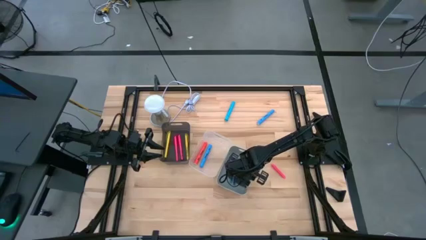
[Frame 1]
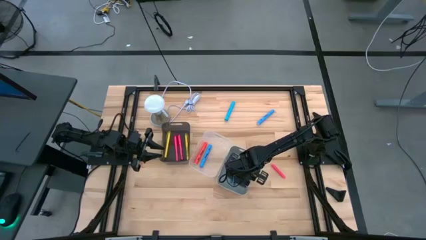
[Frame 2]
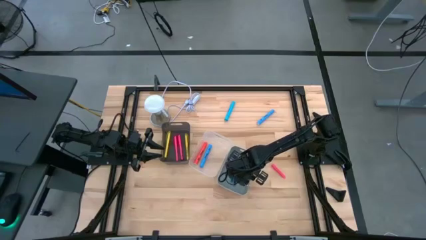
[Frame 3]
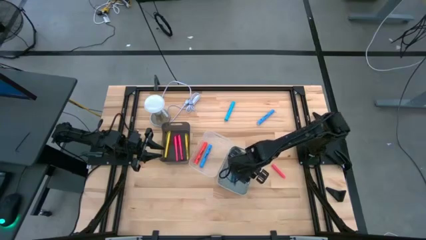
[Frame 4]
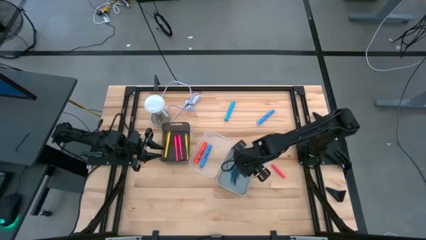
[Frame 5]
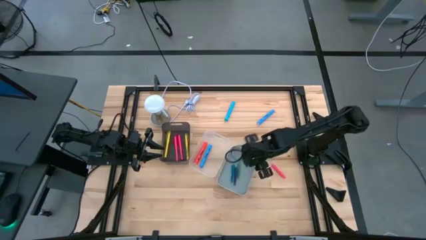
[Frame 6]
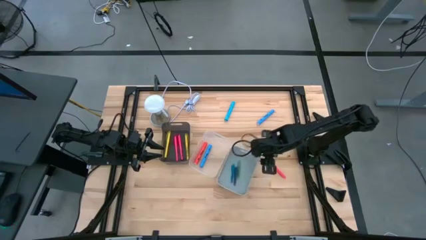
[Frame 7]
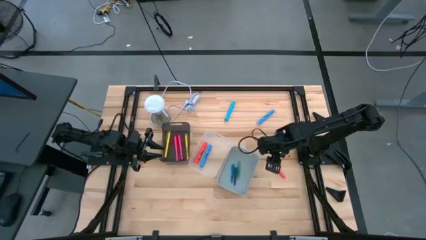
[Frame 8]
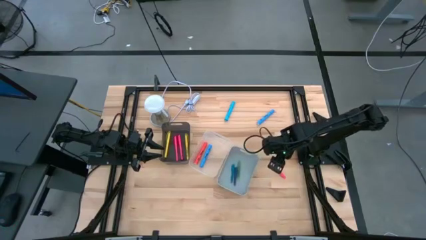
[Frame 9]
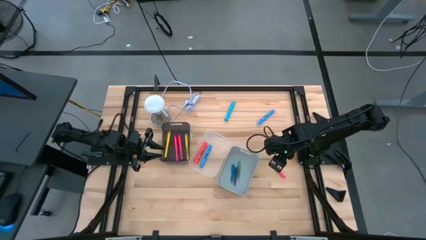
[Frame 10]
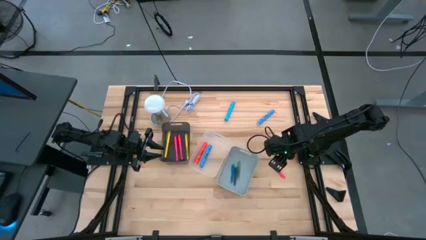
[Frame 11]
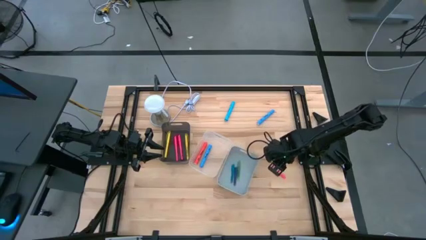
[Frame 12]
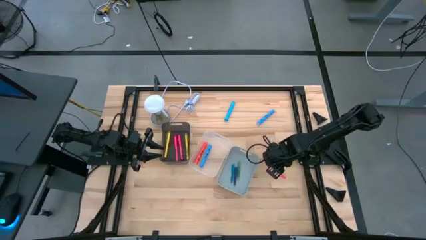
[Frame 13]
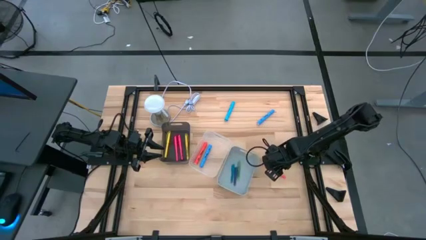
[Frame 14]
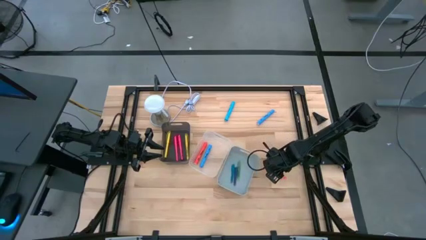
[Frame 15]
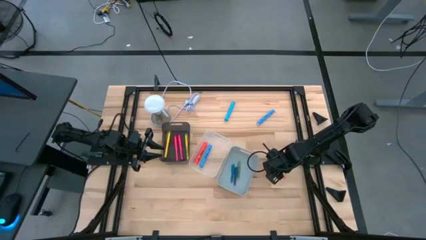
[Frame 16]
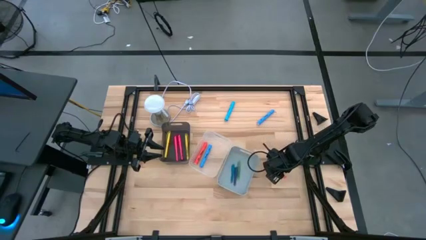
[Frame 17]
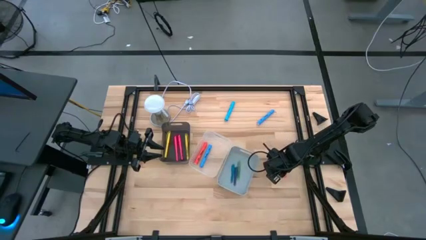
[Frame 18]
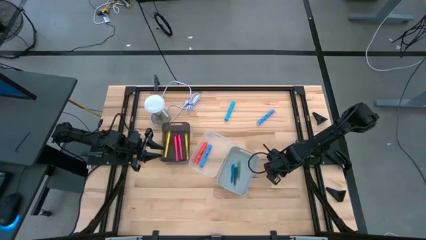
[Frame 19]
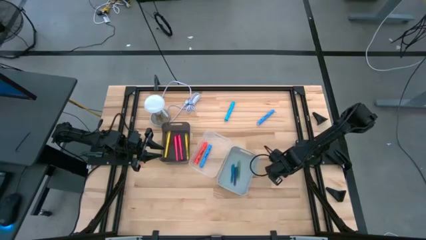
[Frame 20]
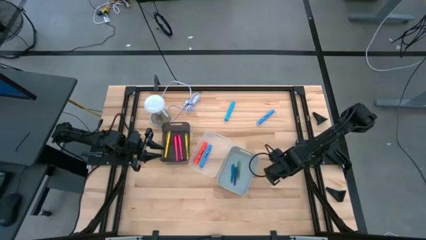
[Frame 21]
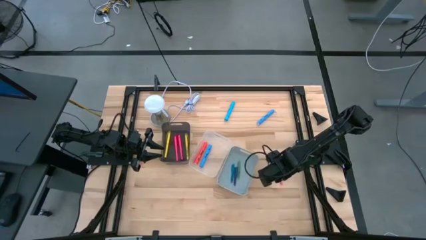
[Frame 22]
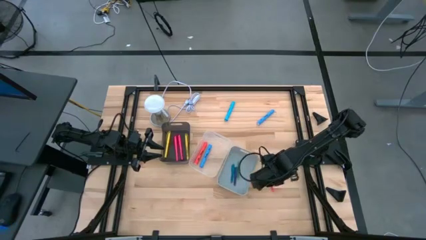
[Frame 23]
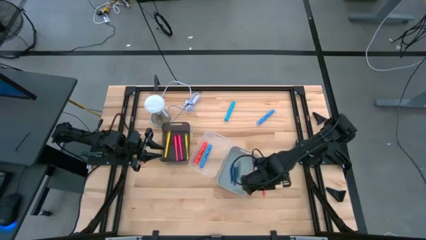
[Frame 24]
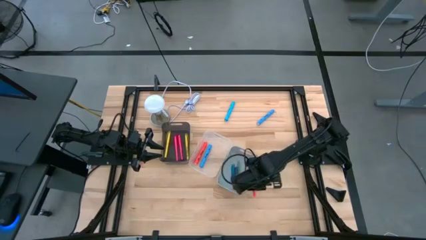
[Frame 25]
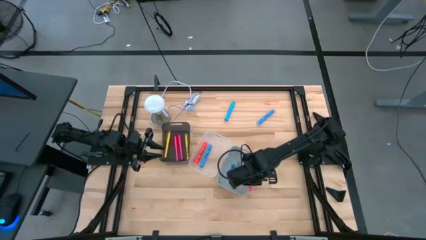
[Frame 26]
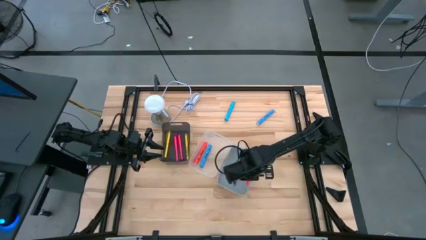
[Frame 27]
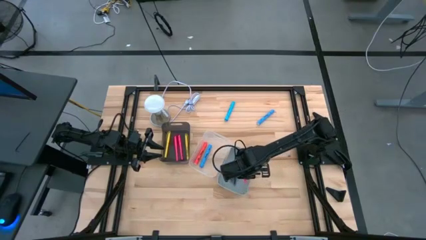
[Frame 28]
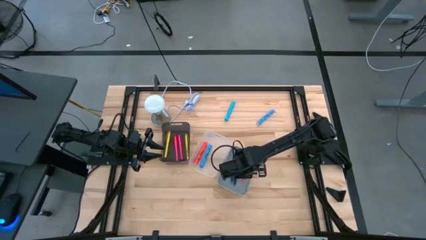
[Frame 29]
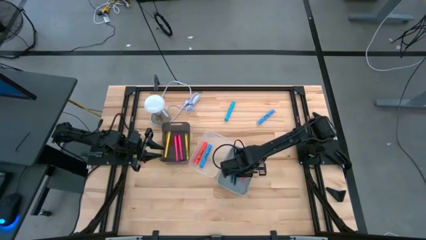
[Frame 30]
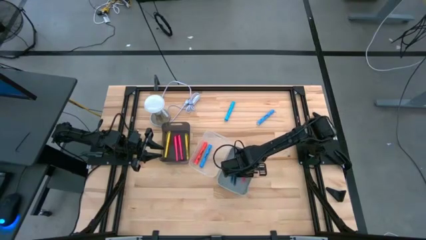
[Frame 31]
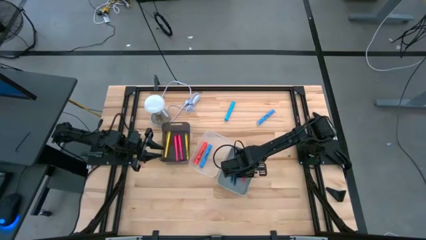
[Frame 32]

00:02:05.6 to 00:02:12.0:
Task: Pick & Place Markers
Put the pink pen into the gray bin

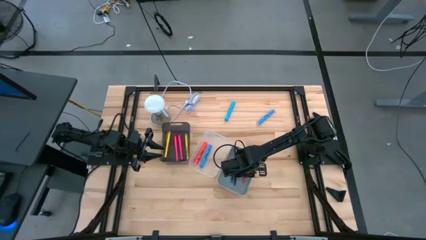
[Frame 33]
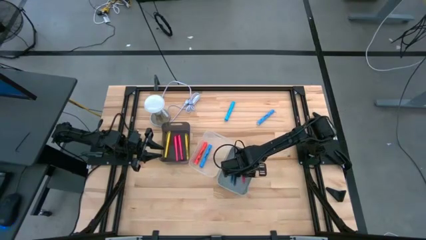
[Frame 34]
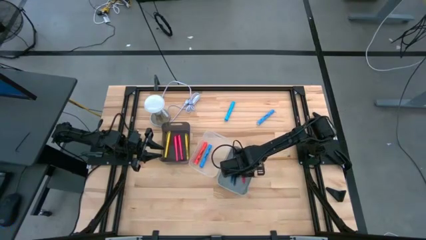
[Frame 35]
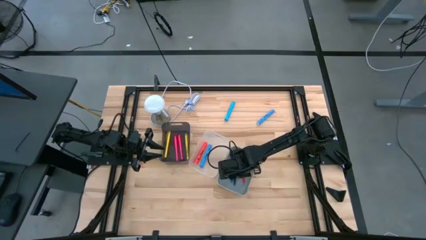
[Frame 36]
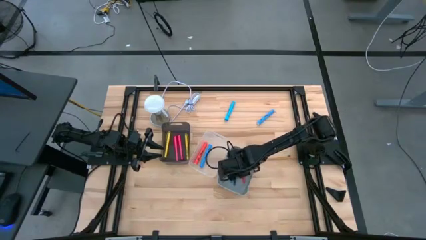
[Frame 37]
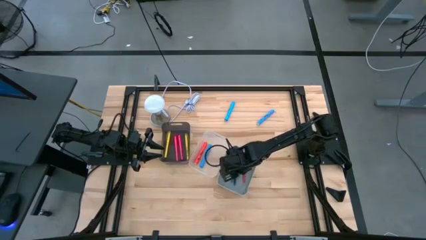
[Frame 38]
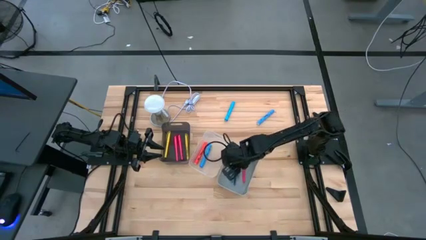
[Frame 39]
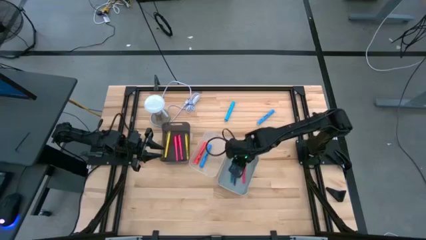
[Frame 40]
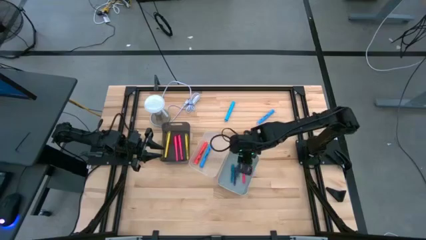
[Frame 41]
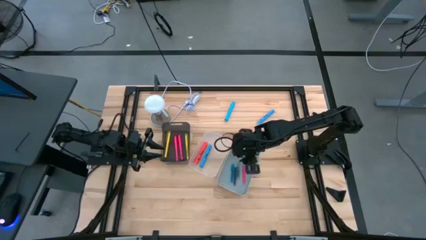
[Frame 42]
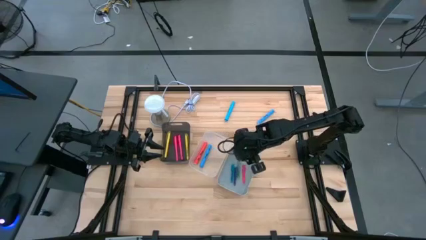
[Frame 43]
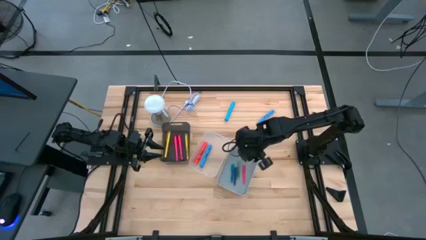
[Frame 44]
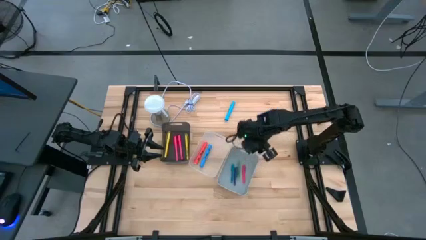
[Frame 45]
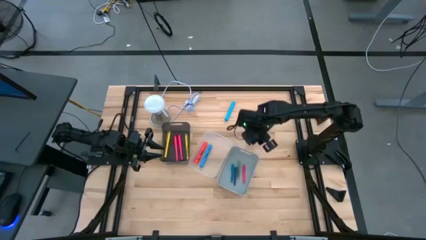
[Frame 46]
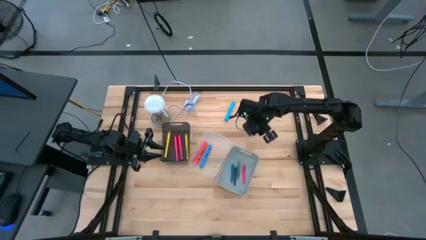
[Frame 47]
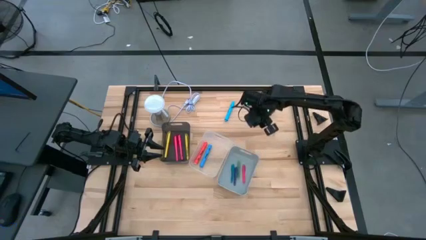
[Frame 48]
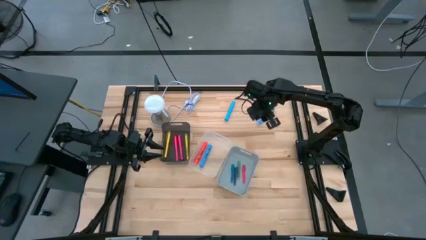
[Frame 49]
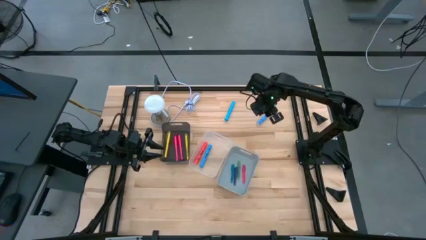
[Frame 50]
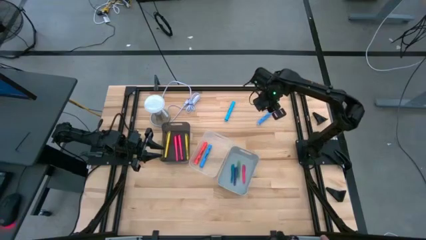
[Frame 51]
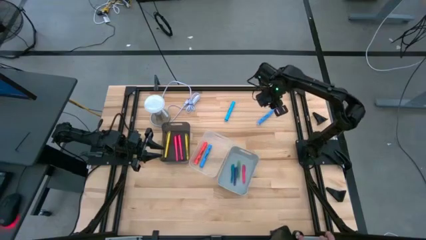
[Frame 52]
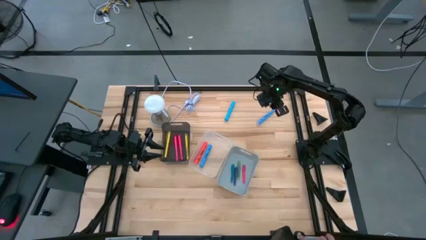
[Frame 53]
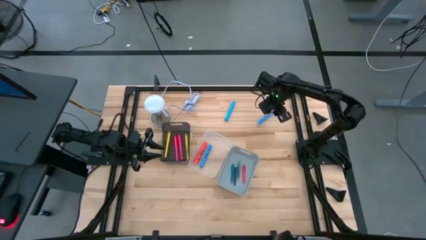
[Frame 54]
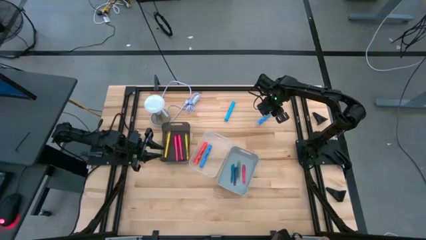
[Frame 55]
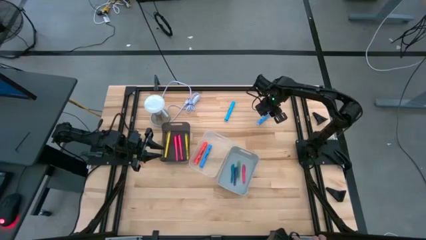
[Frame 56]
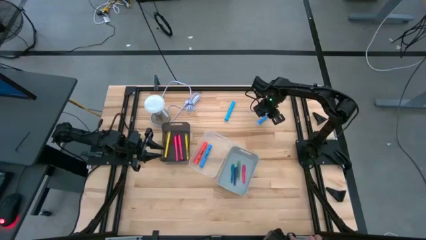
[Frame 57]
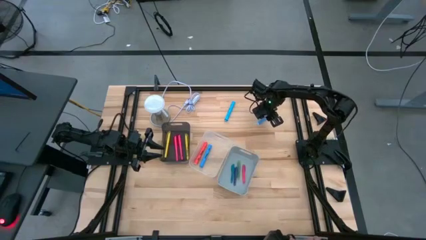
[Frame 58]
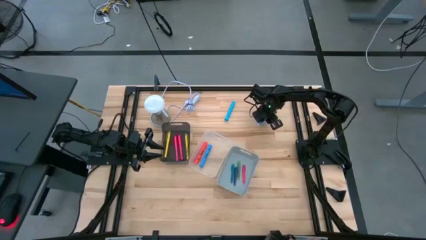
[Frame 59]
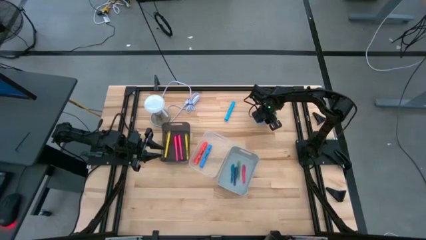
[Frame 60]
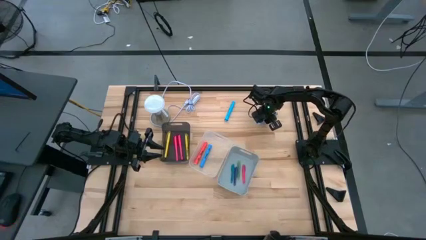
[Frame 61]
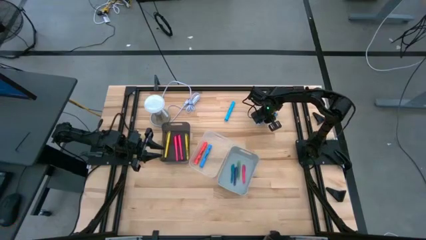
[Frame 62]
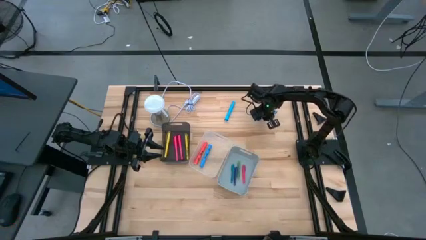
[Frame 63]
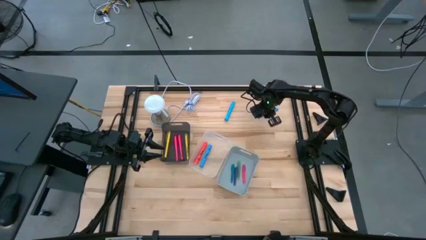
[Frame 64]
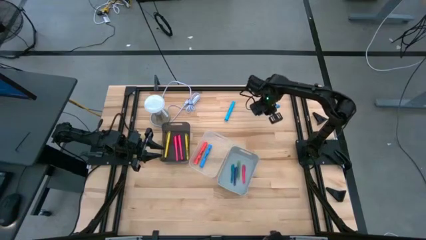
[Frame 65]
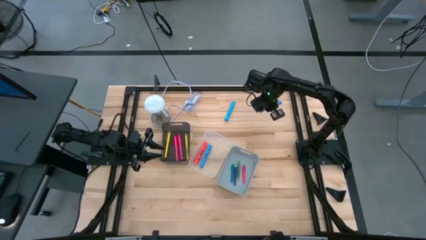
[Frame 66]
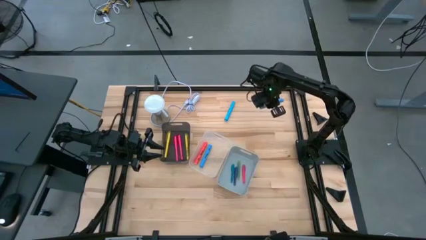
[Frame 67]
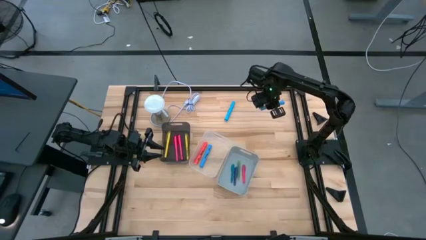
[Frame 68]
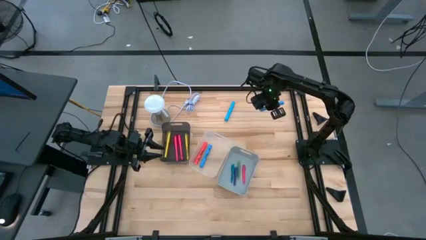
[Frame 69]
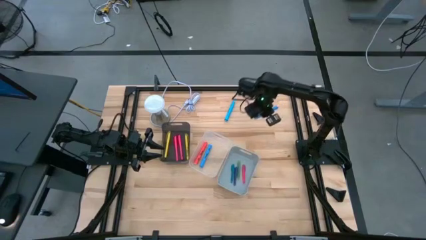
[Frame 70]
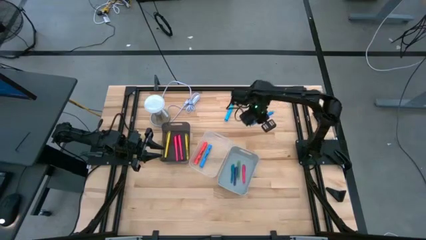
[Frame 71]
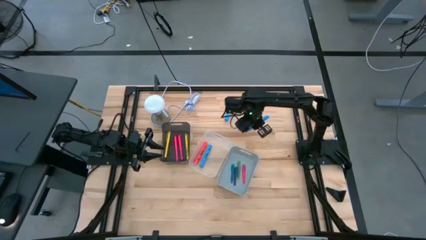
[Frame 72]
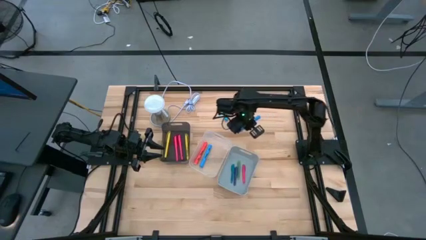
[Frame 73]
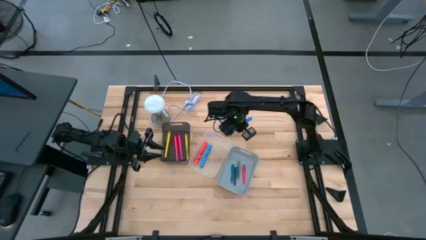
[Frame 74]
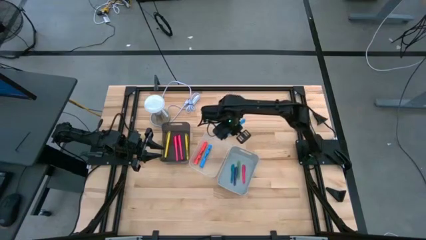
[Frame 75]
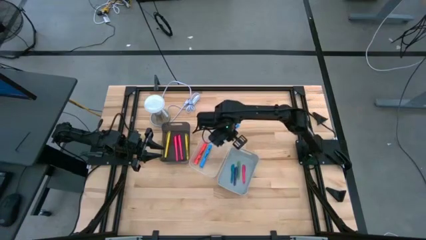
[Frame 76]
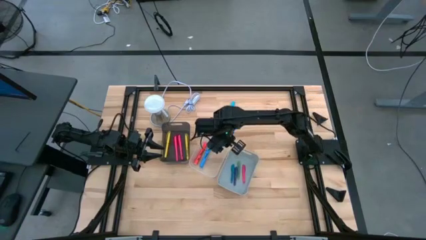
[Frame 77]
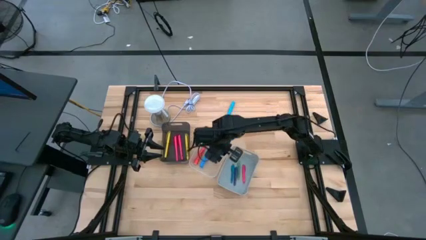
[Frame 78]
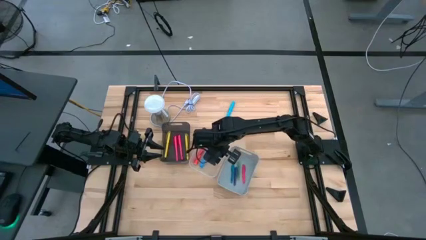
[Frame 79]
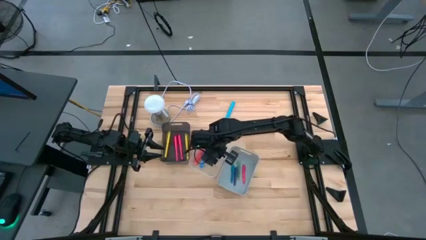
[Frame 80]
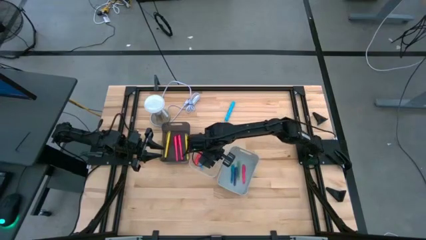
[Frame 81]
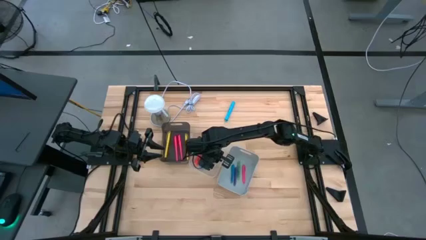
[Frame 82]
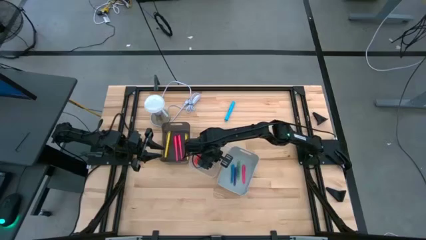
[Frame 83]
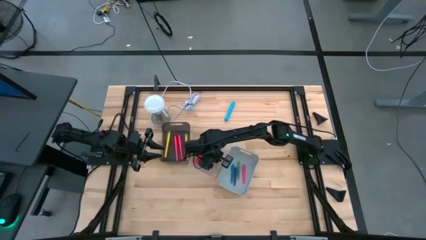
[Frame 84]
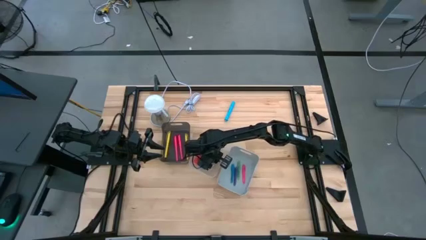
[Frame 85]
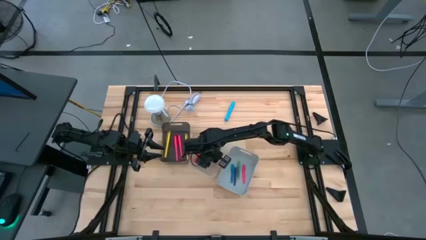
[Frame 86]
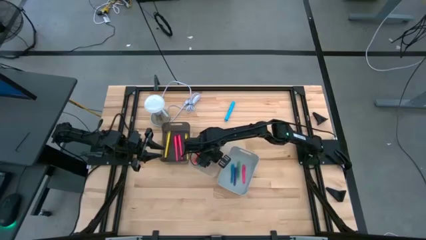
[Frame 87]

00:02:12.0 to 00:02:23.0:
Put the right blue highlighter into the transparent bin

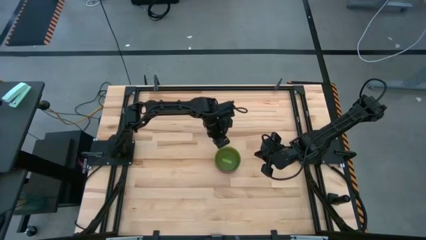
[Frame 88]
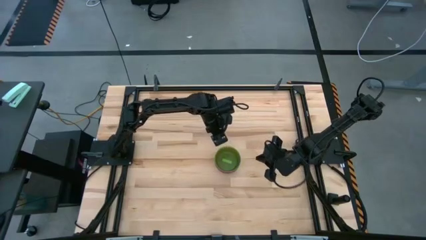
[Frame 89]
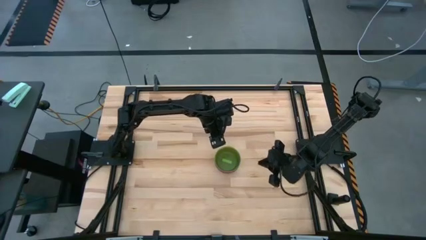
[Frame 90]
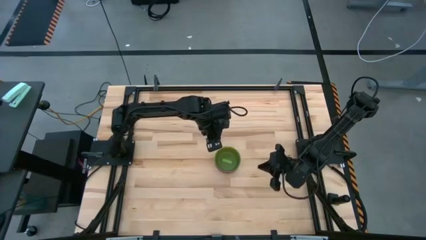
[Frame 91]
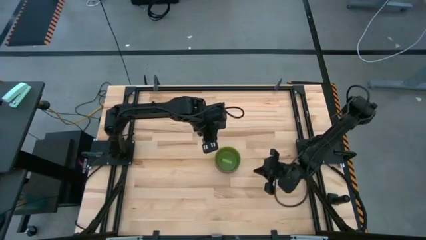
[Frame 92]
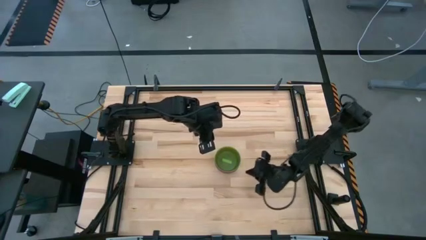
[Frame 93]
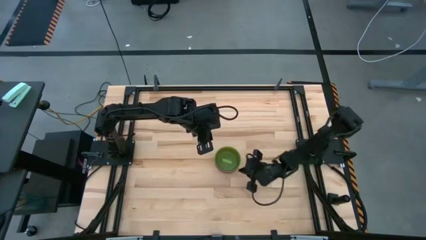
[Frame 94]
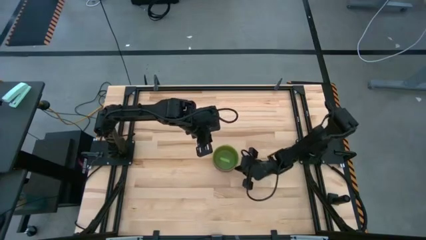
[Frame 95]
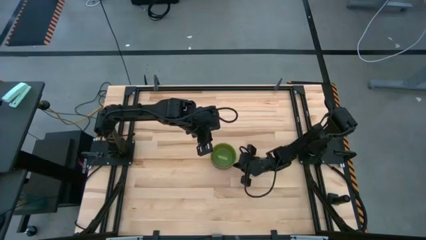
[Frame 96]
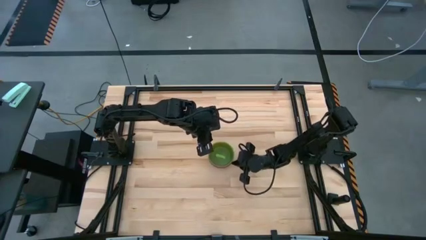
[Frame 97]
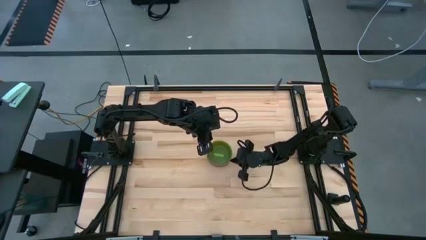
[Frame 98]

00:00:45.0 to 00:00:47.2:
Task: Nest bowls inside each other
Adjust the stacked bowls to the middle of the table
